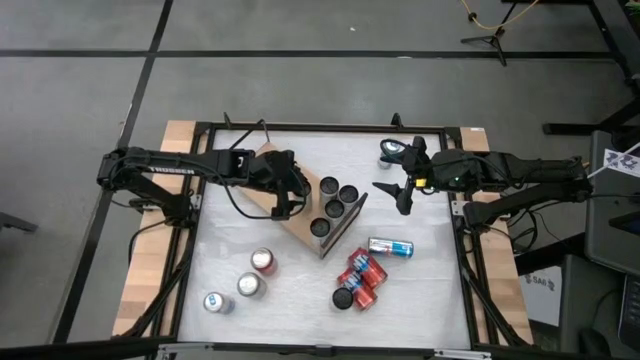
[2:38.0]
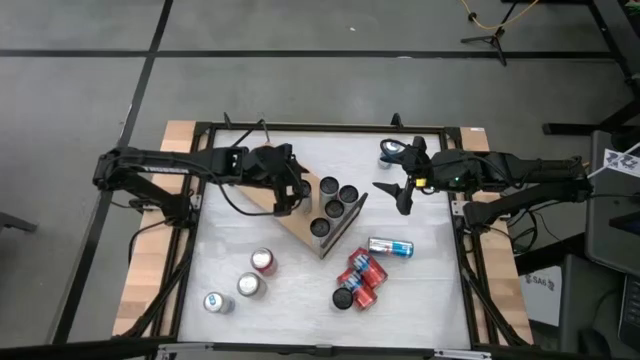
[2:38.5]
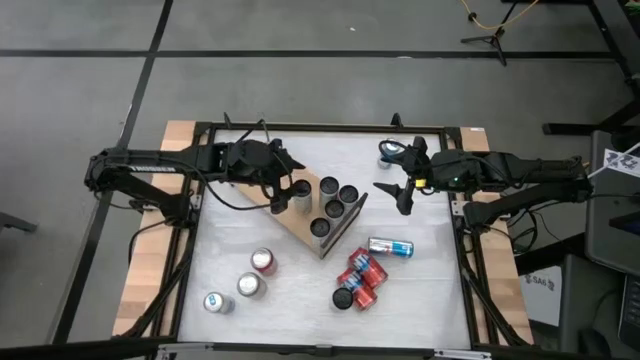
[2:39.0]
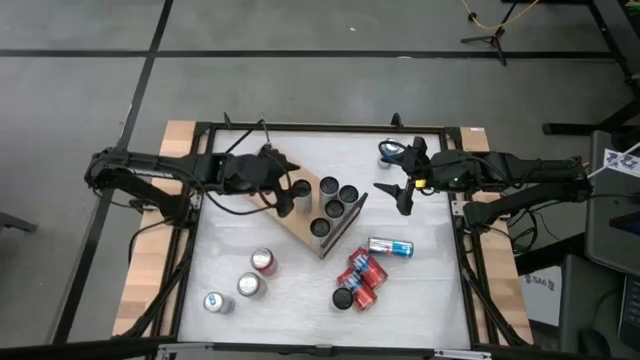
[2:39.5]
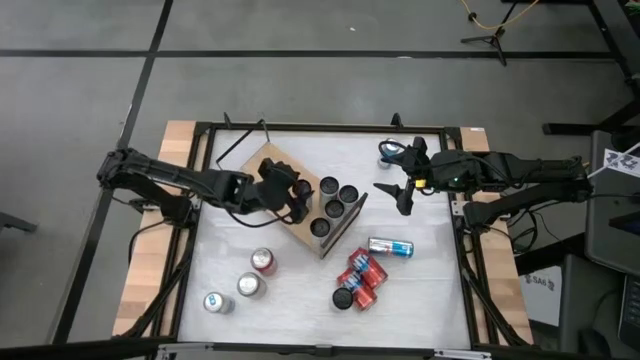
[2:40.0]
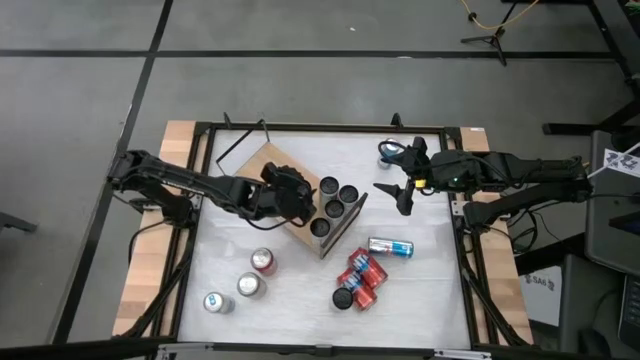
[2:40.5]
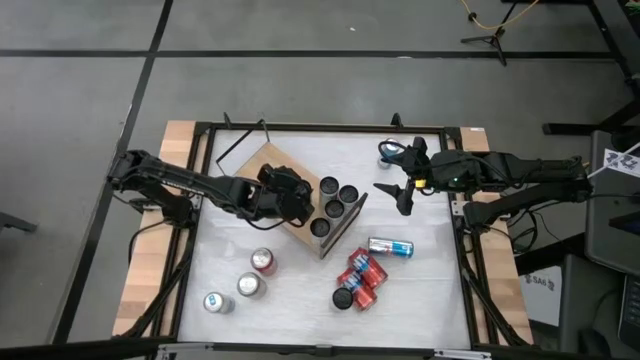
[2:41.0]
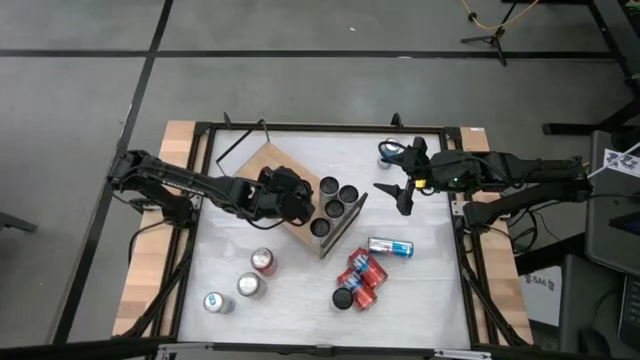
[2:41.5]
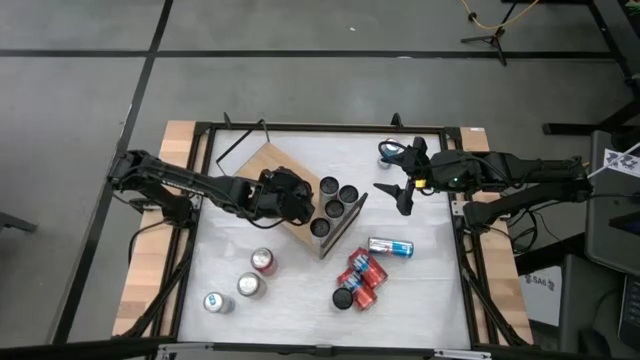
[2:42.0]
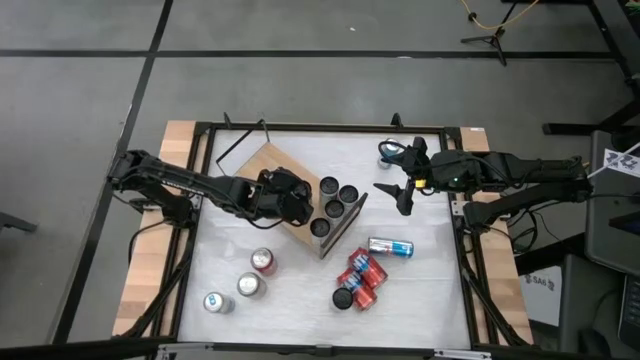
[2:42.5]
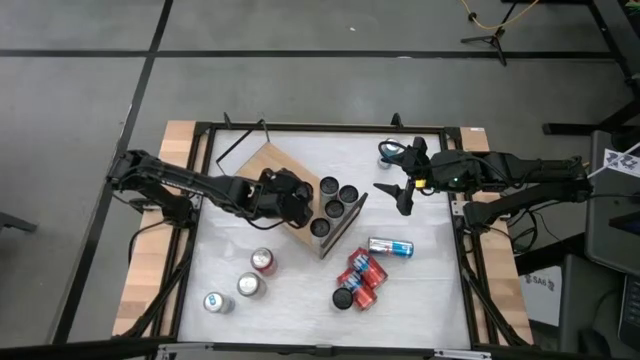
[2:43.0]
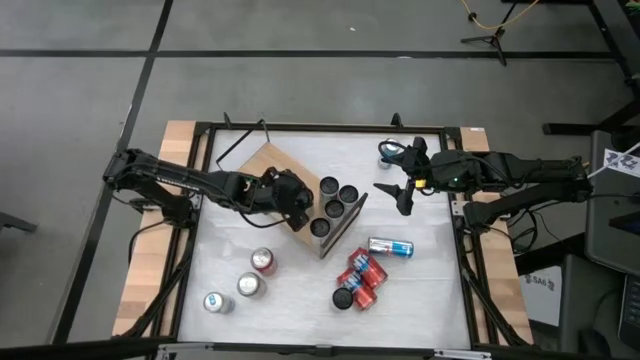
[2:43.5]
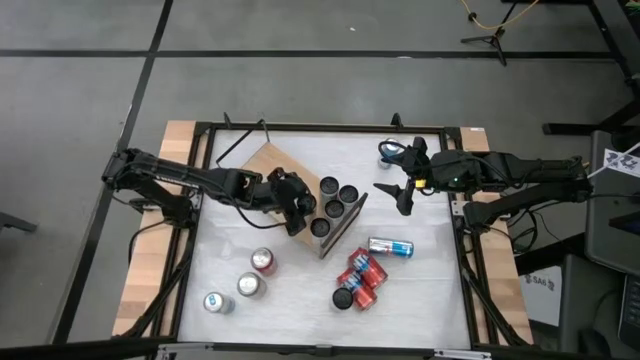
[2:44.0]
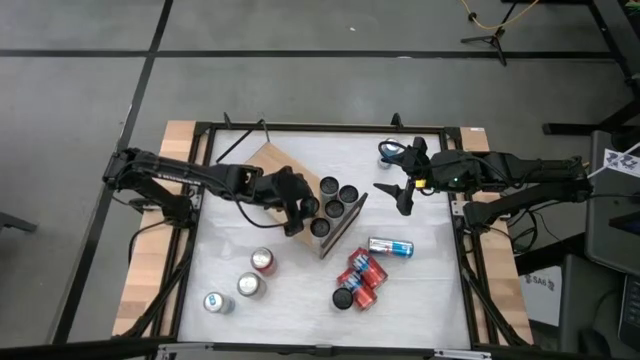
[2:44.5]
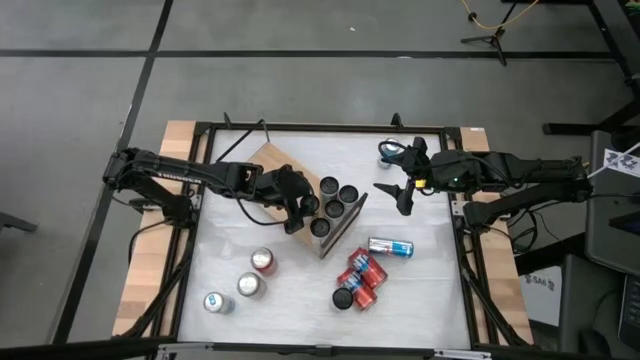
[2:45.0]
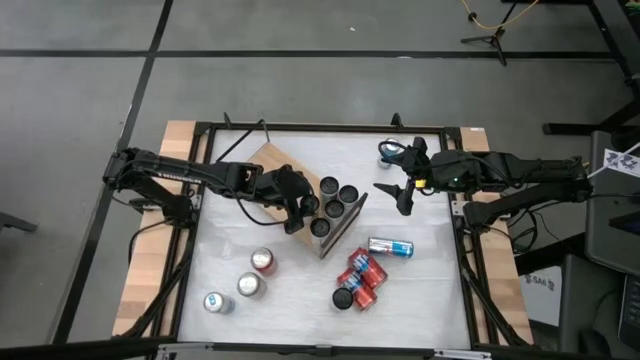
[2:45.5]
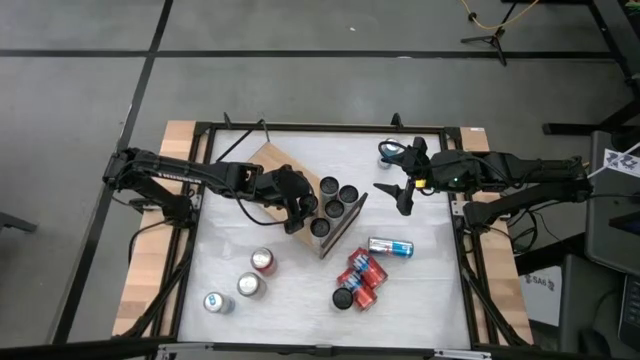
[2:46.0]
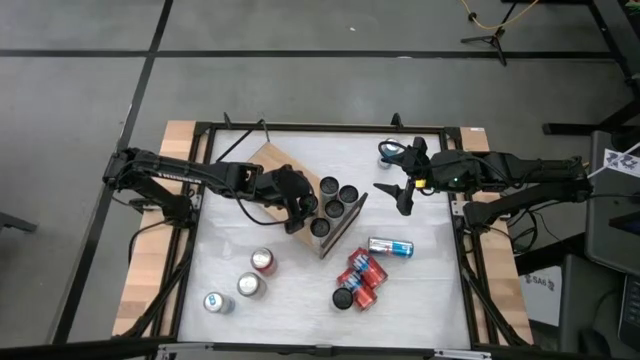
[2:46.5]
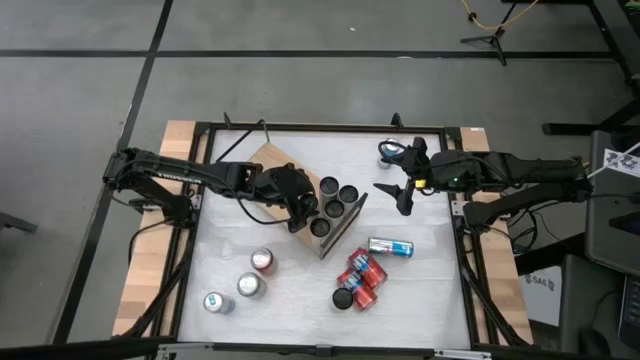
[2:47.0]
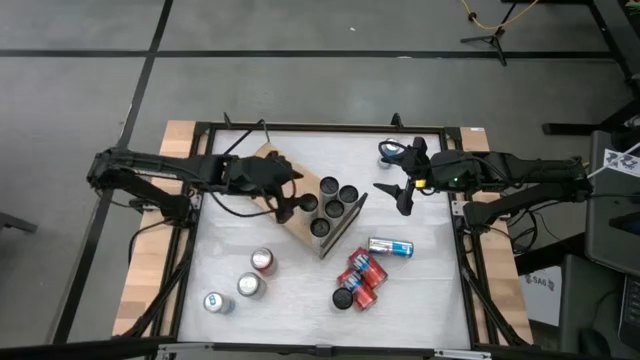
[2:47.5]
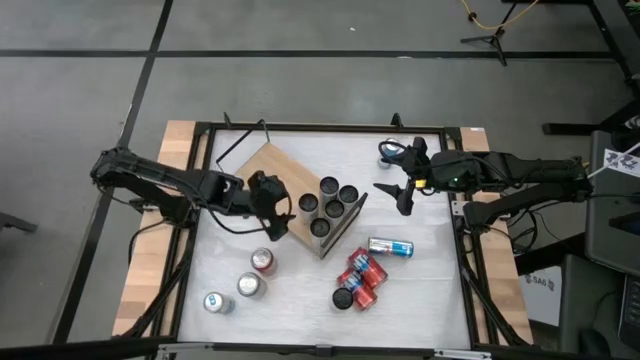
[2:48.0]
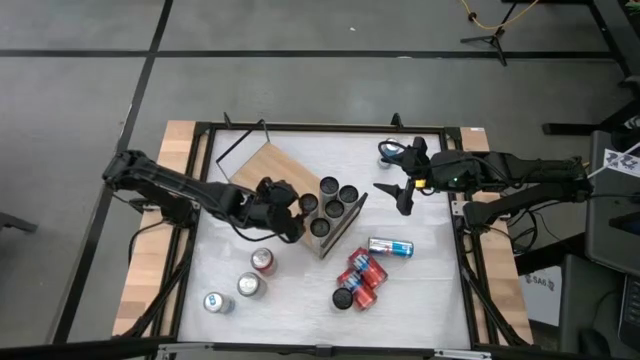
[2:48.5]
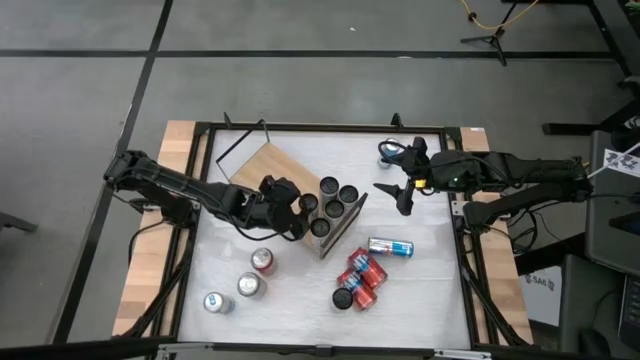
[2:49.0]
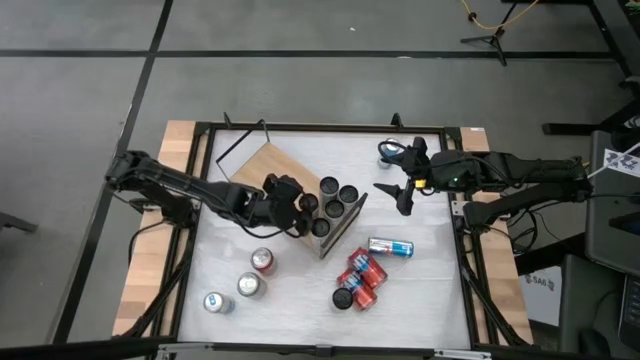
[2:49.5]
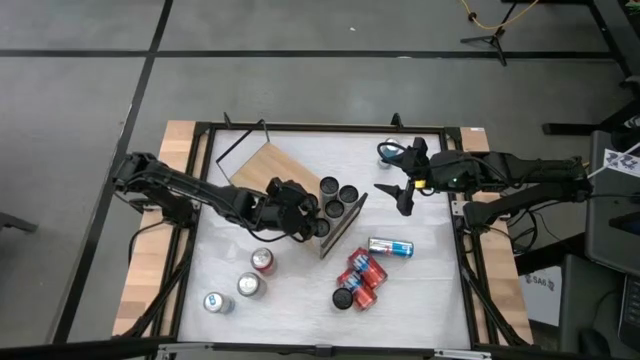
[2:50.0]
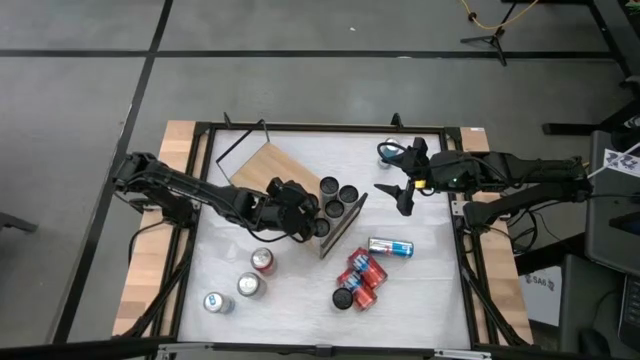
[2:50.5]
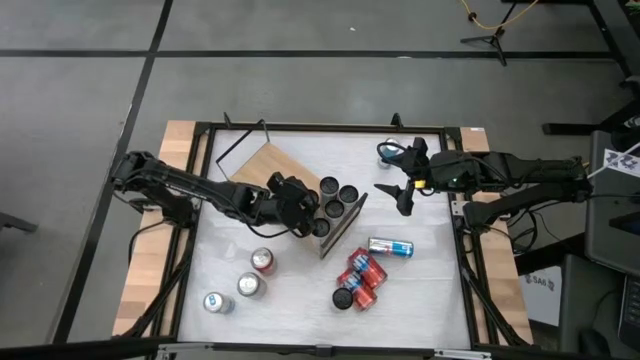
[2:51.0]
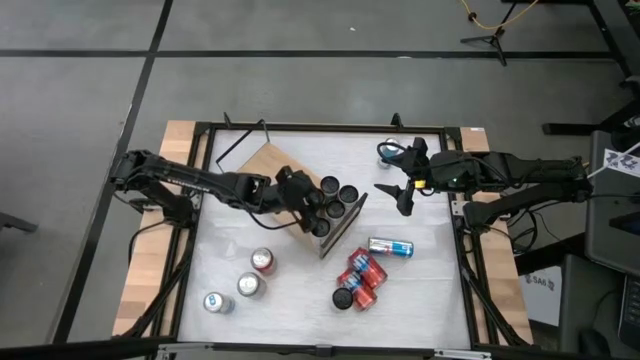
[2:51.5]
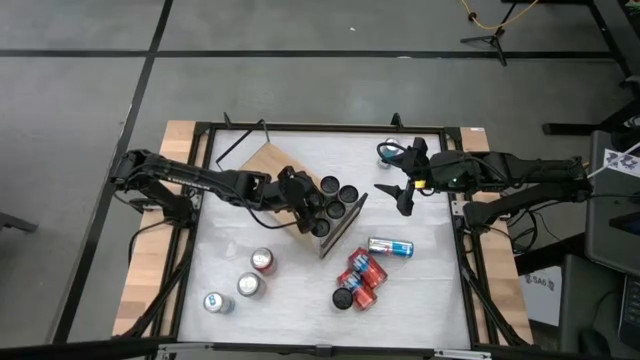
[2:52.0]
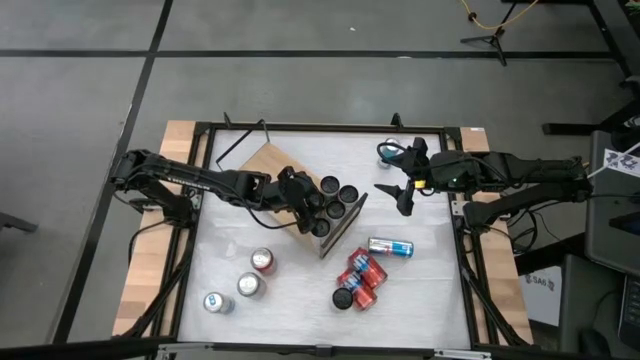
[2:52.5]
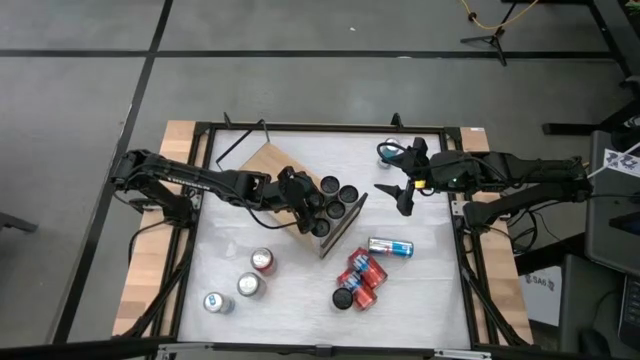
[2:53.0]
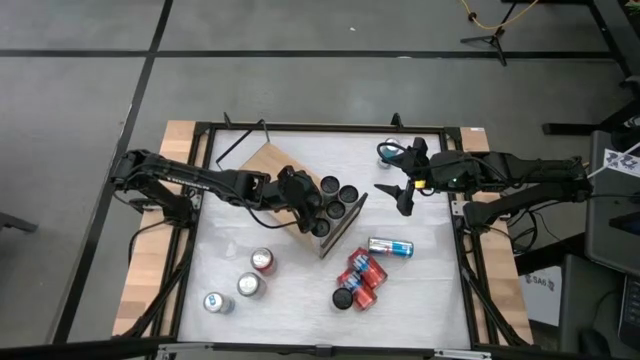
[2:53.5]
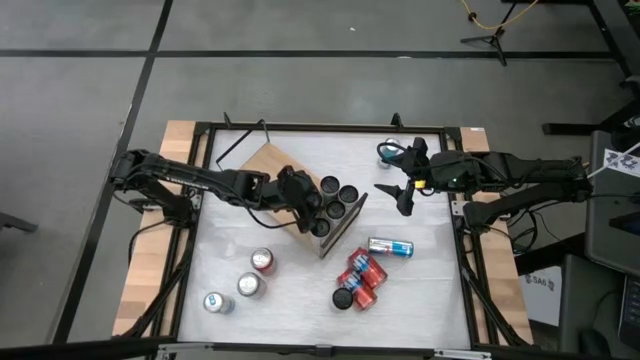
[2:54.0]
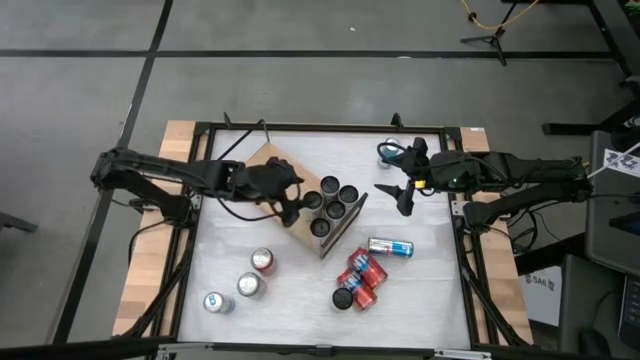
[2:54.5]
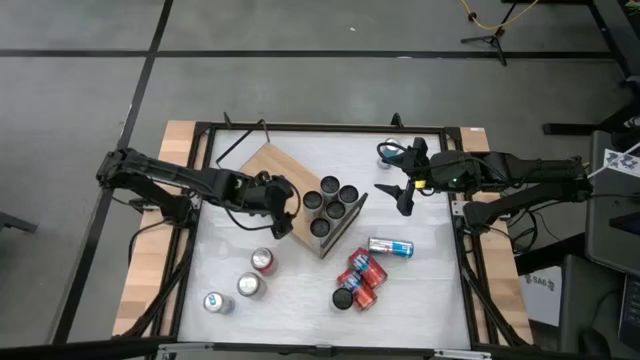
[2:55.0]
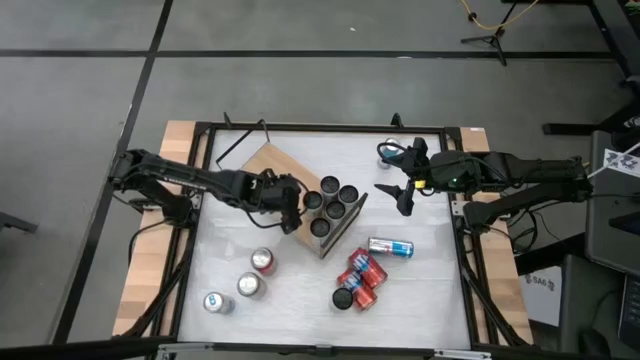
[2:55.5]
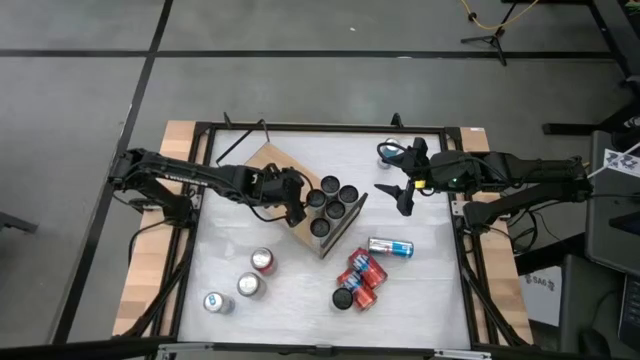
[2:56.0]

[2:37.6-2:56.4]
Task: Place canned beverage on shelf
Put the top white-yellow soda can on the shelf aligned with the other white-yellow soda can
